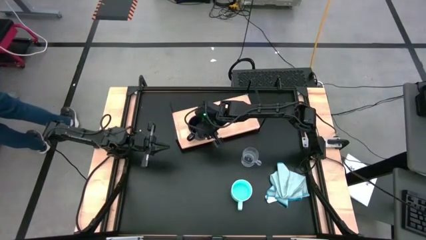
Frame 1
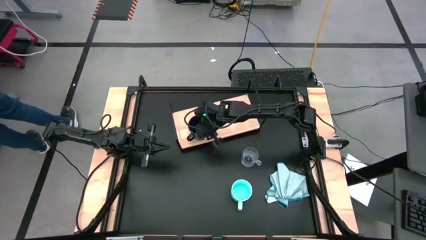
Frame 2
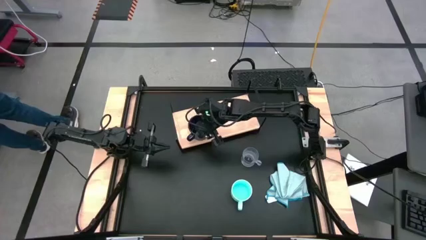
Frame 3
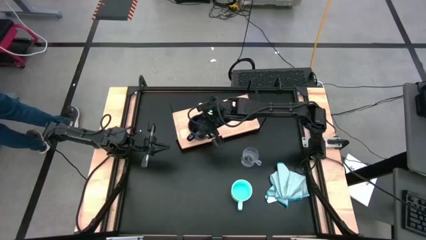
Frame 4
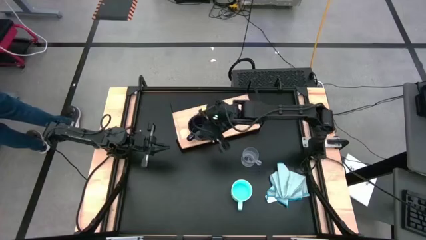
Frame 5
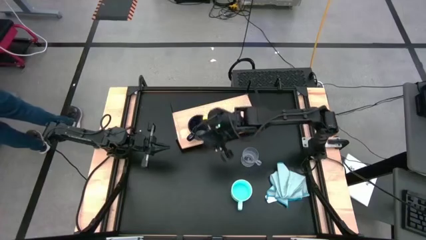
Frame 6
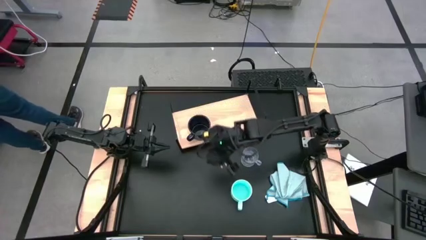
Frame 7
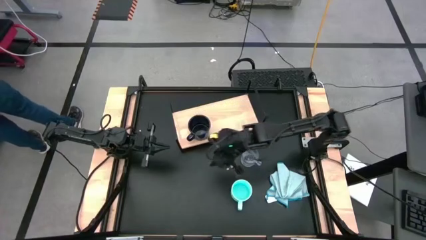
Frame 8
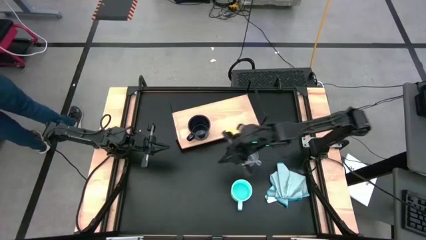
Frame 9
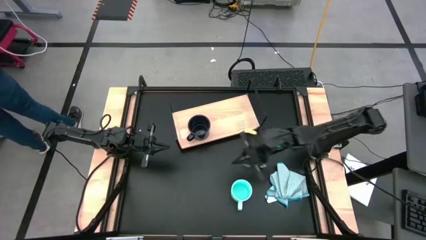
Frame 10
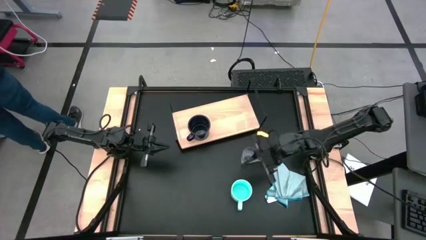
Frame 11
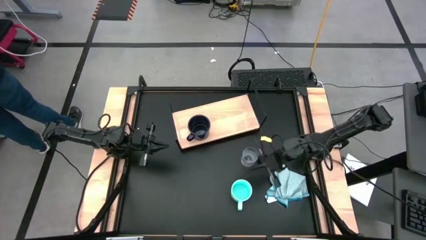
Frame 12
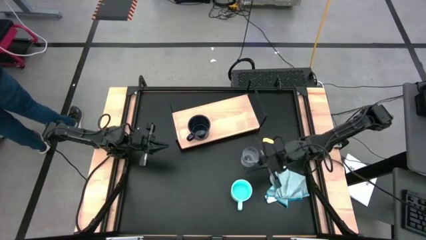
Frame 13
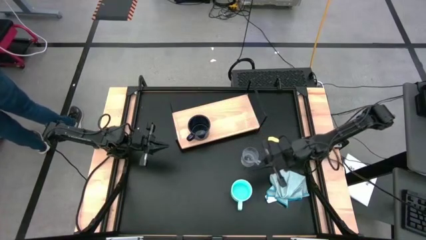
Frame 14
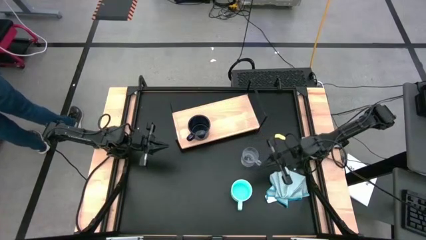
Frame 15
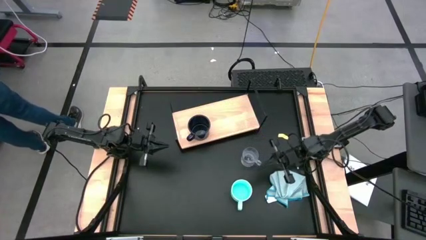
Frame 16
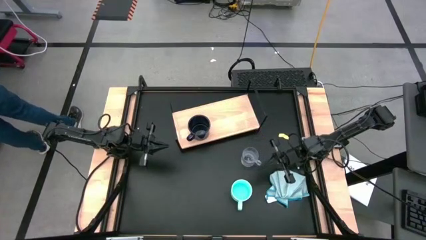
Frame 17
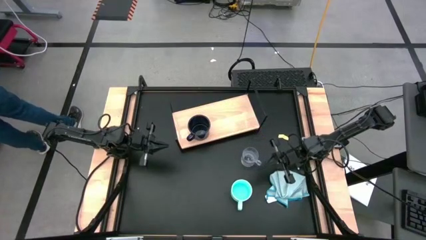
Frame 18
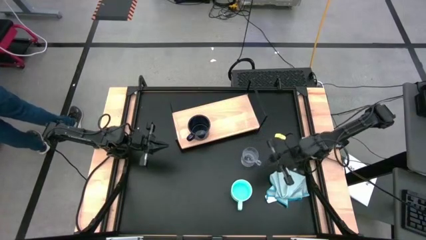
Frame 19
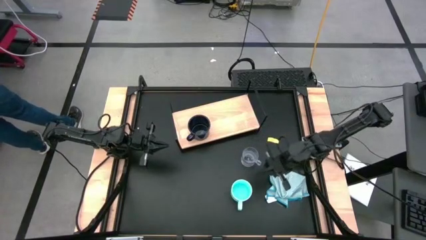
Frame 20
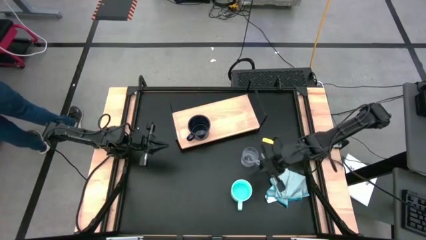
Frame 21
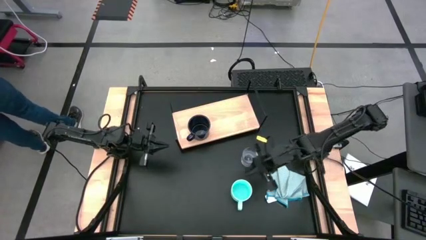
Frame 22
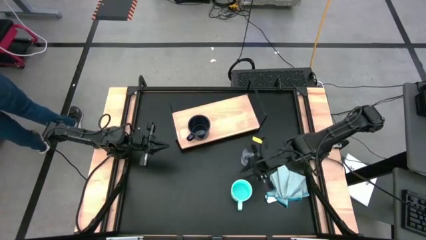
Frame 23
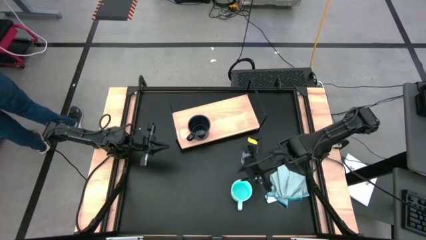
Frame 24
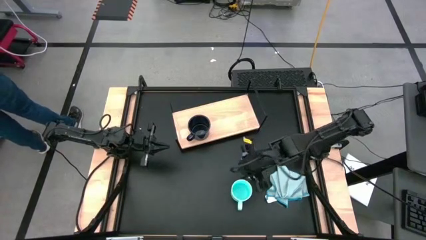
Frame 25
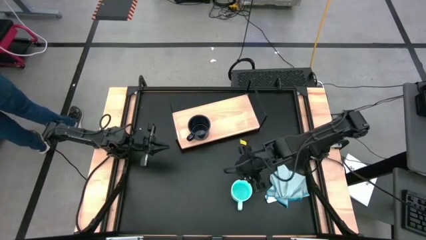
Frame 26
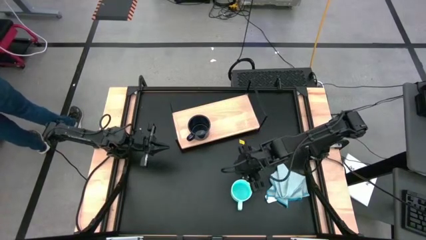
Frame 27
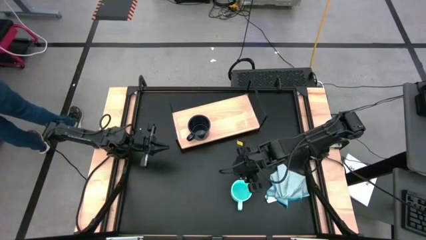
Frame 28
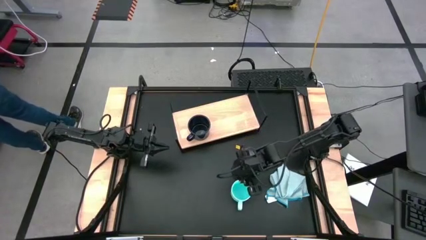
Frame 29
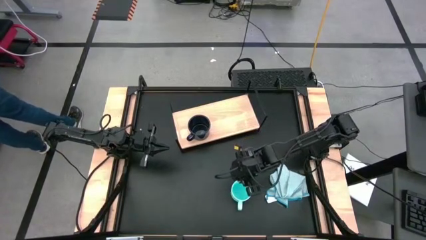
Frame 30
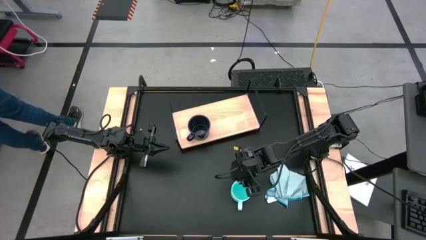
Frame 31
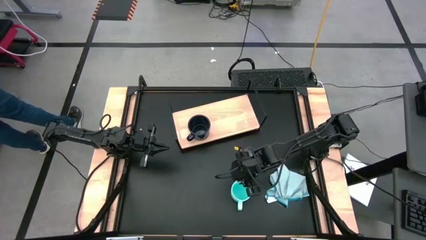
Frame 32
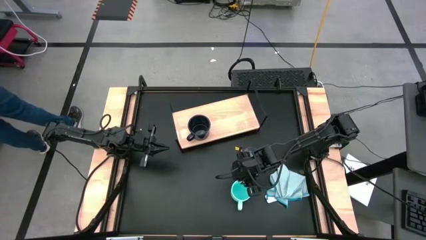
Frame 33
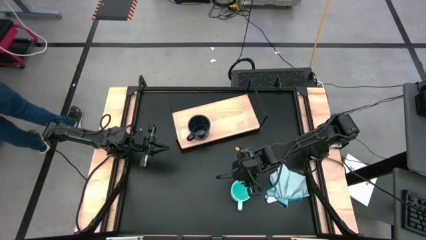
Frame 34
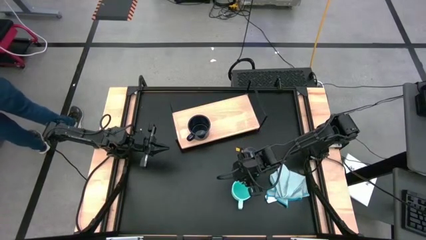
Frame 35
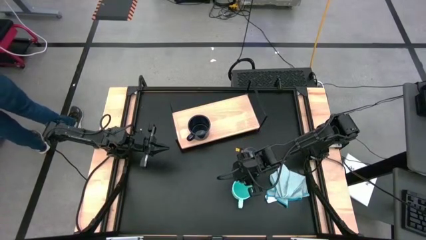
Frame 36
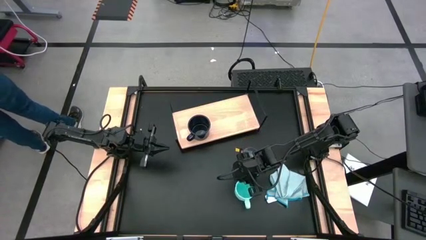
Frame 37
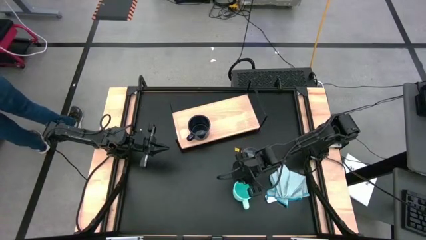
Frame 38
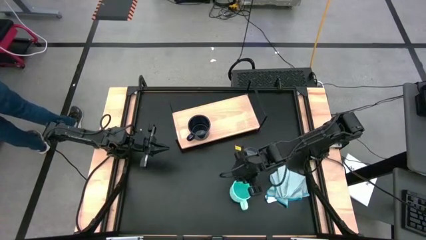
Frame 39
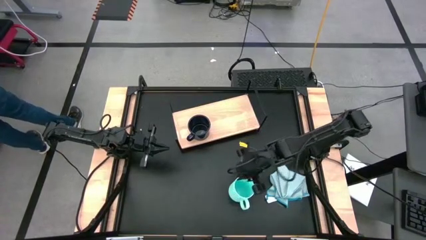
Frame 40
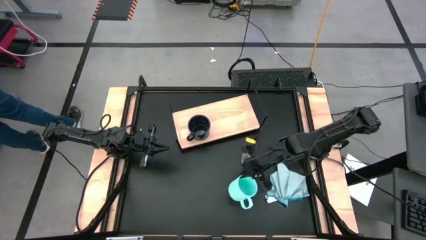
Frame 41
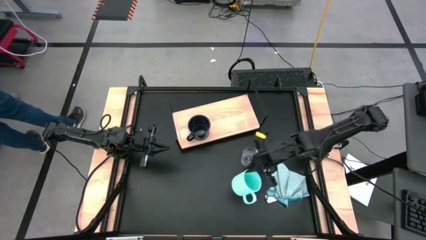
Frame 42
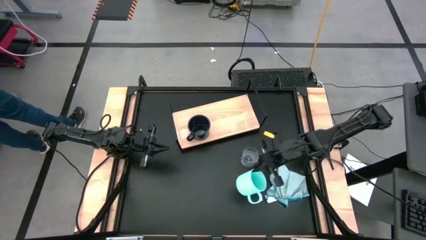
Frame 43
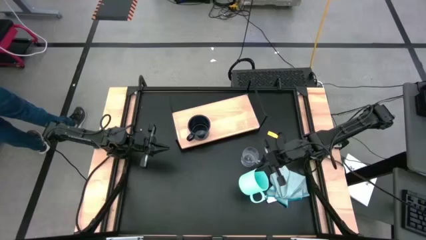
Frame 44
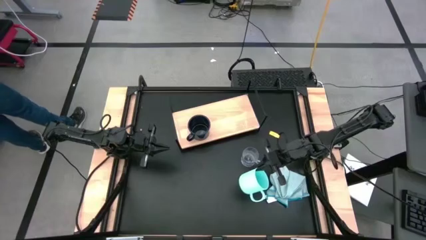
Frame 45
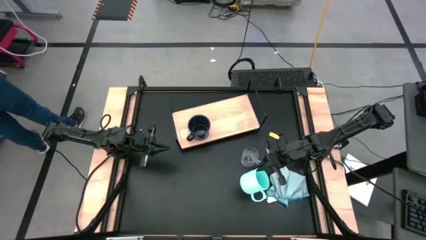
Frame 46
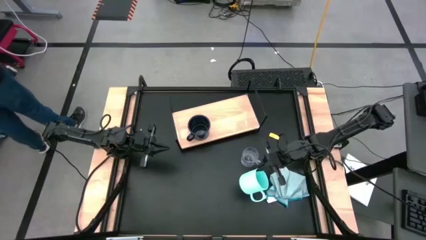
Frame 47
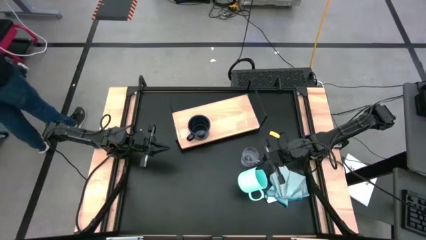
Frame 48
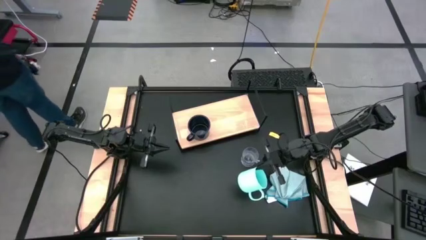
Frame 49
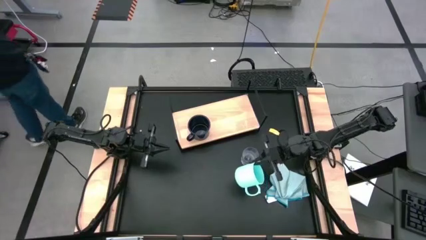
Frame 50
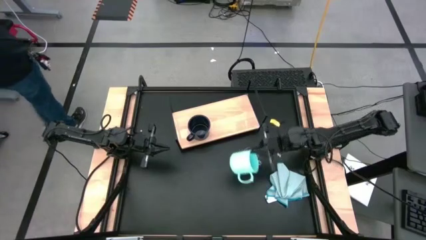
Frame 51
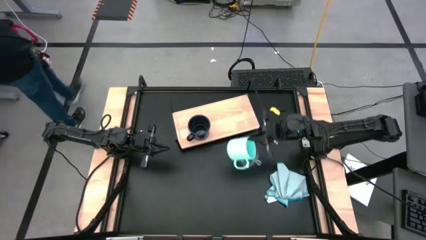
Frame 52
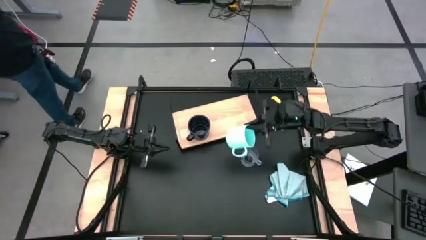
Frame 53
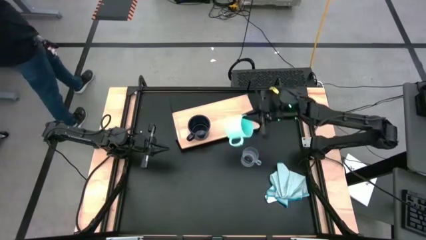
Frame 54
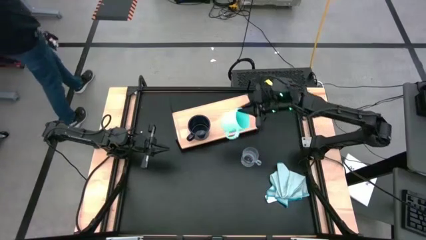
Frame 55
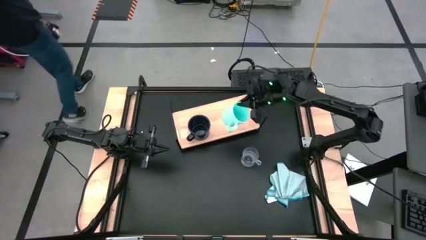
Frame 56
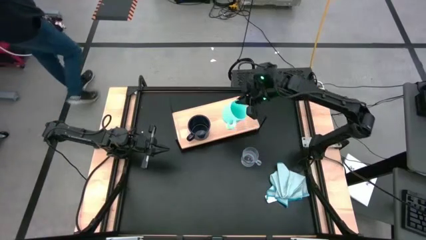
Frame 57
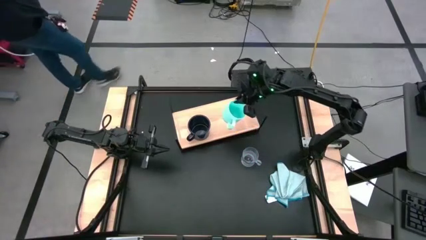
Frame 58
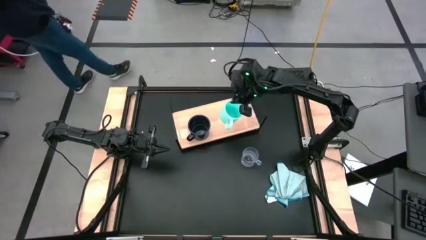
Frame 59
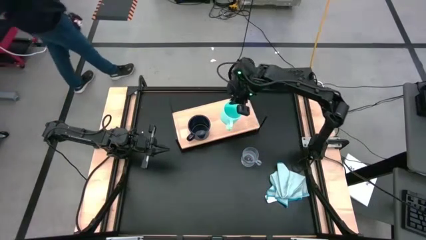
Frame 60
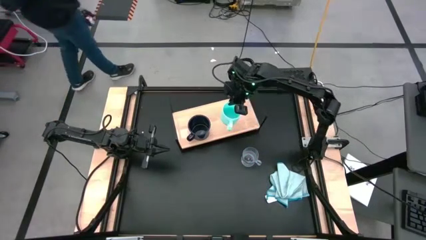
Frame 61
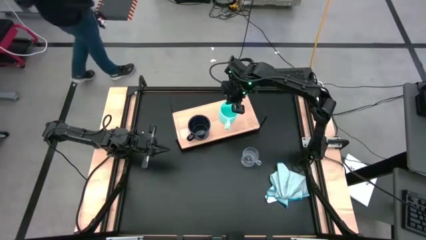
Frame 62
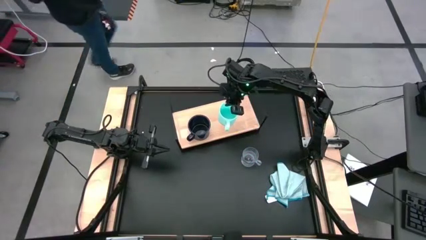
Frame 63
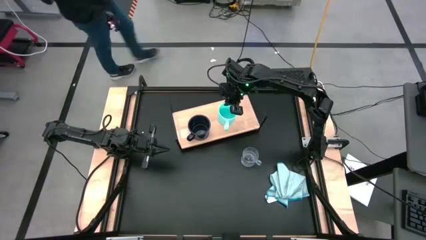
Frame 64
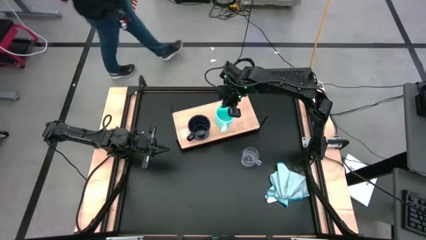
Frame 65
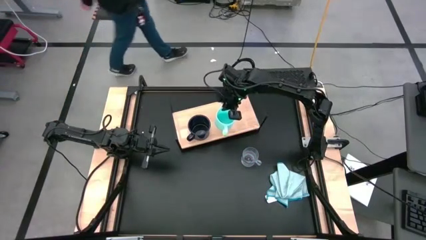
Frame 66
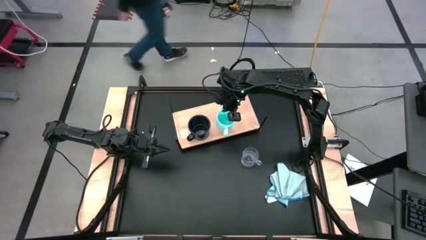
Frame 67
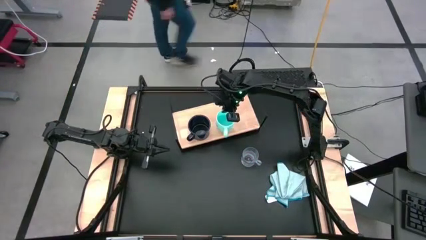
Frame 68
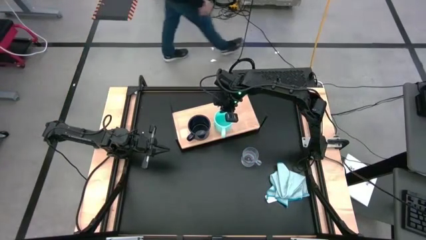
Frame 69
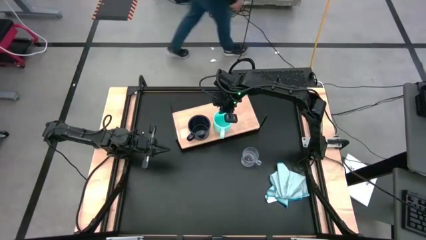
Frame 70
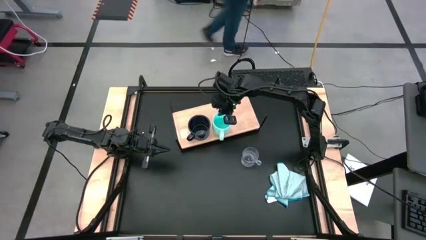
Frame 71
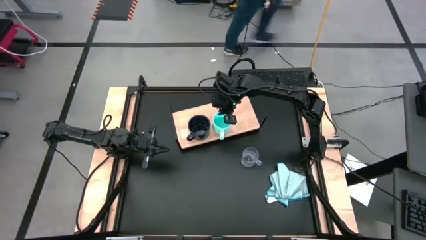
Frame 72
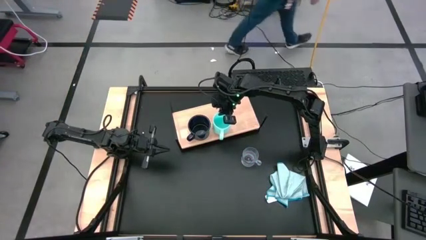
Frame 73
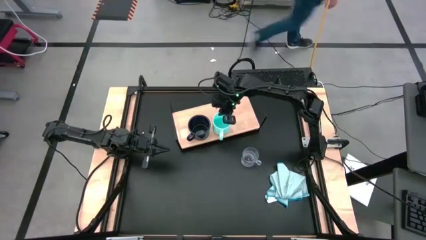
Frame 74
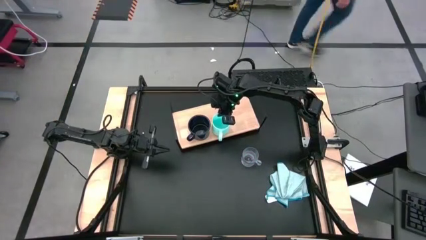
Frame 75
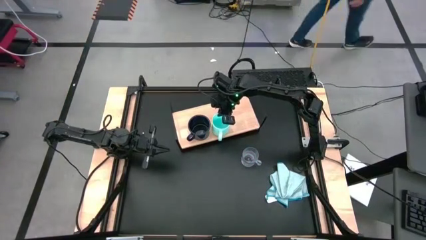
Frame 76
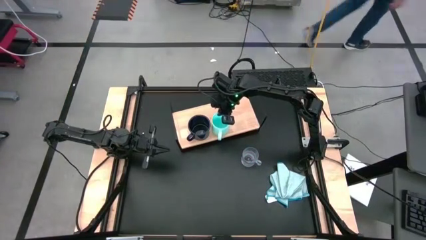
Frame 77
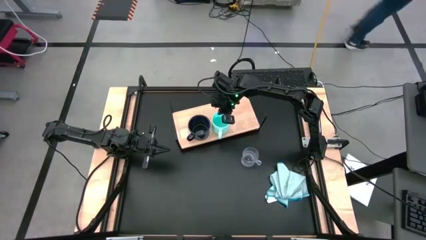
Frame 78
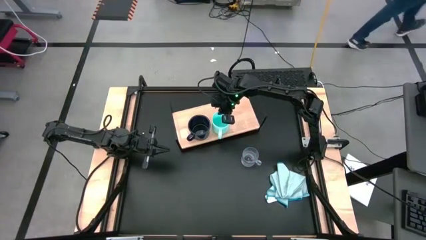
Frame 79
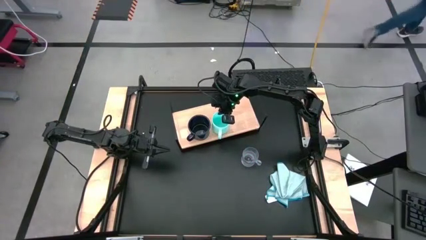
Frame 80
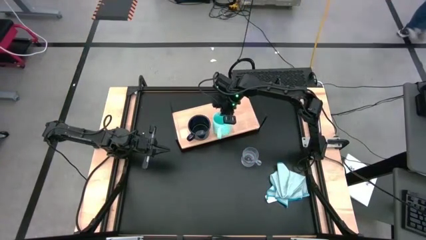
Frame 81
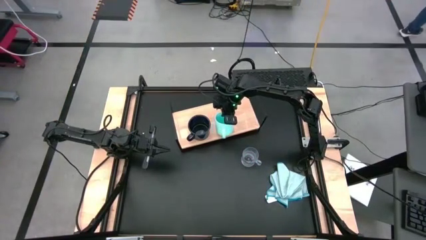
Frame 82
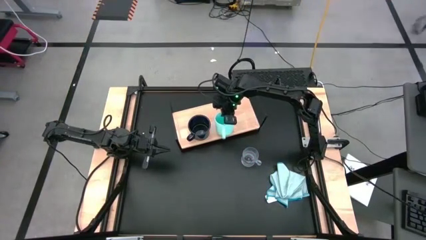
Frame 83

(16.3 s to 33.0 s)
Task: Stack small to large cups/mugs on shelf
Put the light blue cup on the shelf

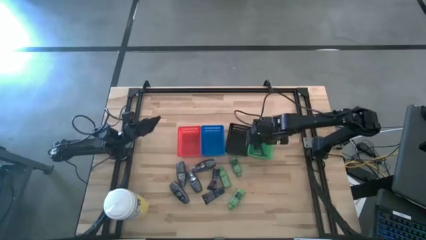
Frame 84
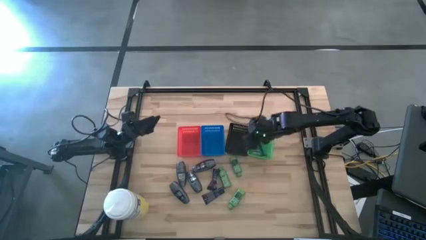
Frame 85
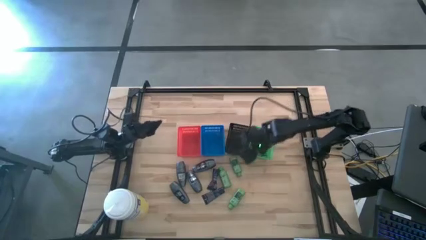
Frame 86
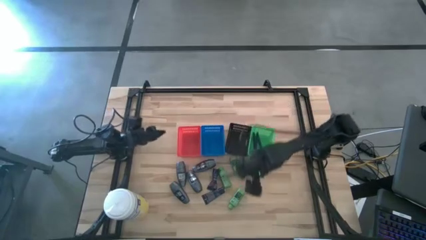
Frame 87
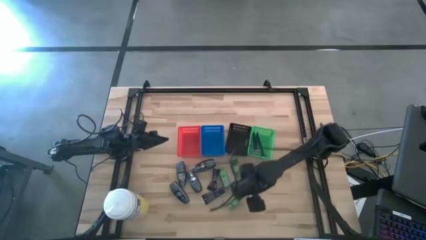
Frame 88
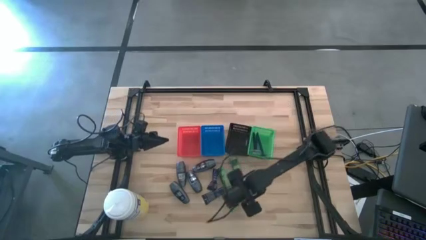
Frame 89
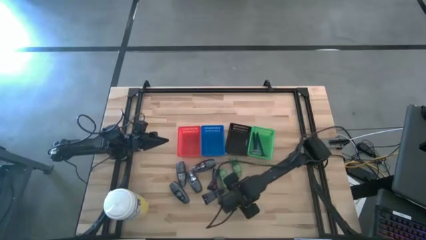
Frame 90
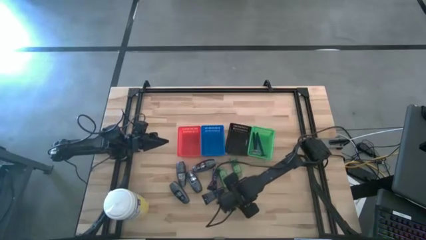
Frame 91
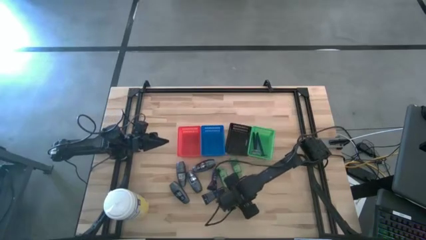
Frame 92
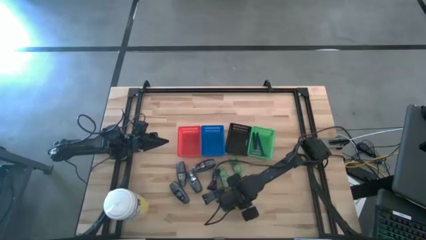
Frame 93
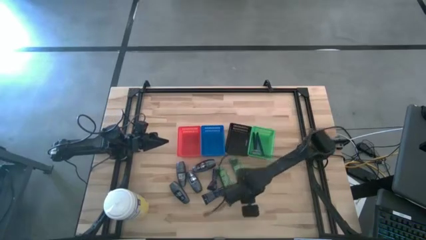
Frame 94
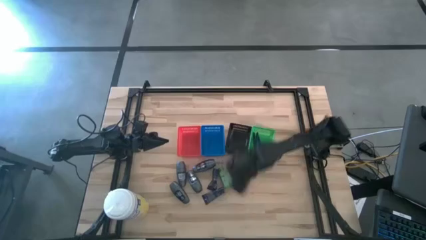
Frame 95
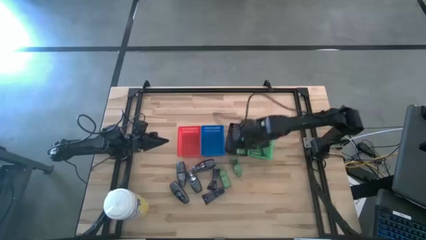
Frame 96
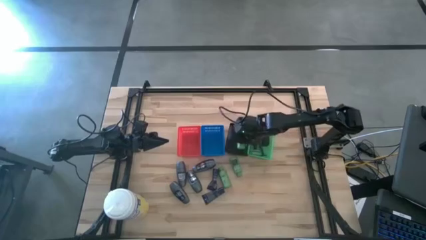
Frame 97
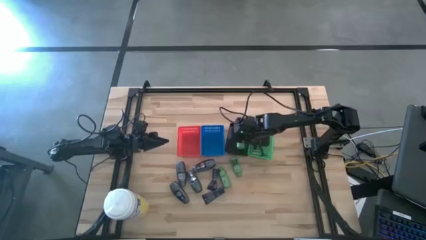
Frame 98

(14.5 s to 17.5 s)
Task: Pick & Place Travel size toiletries
Put the shampoo into the black bin
